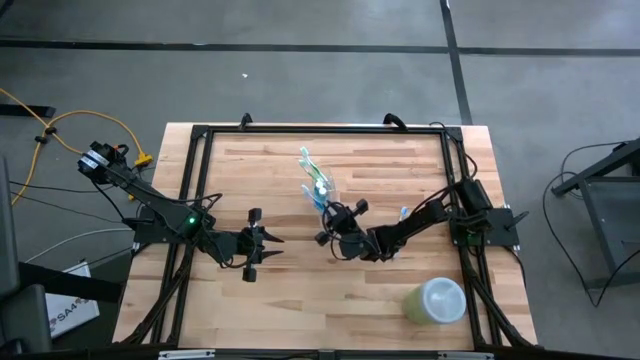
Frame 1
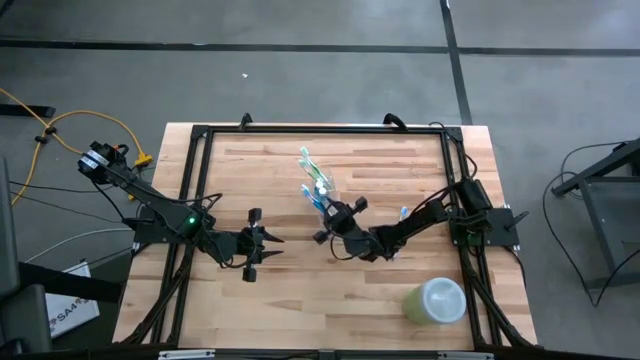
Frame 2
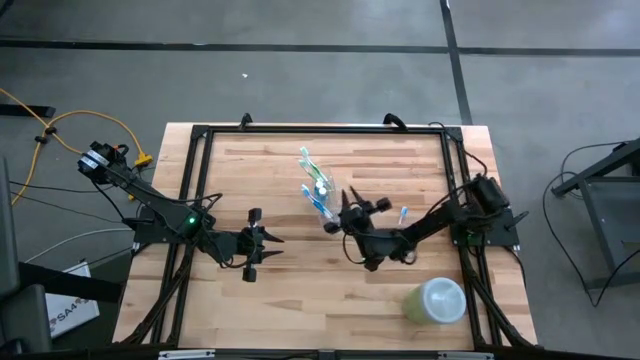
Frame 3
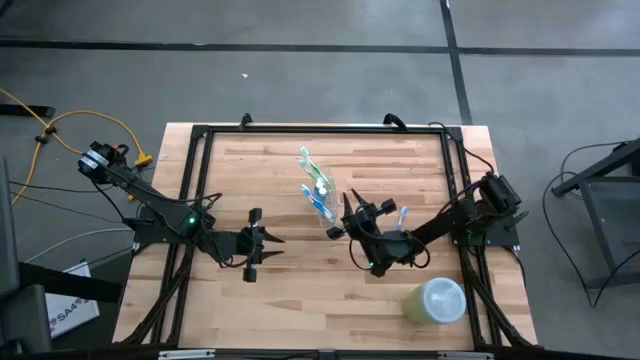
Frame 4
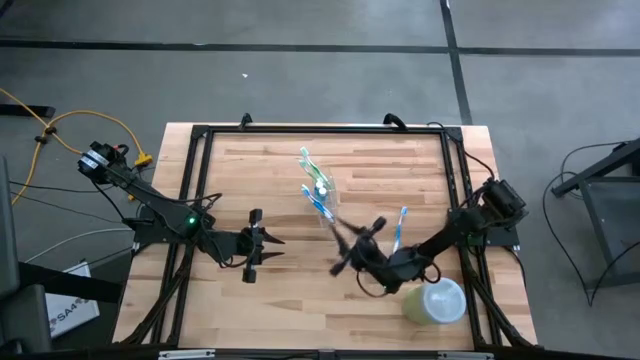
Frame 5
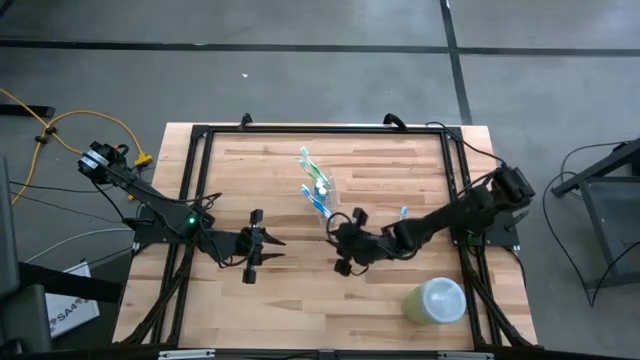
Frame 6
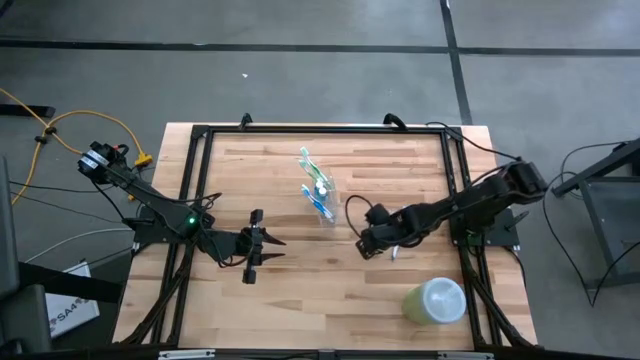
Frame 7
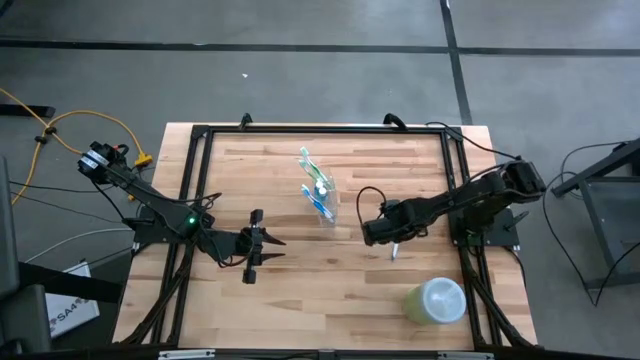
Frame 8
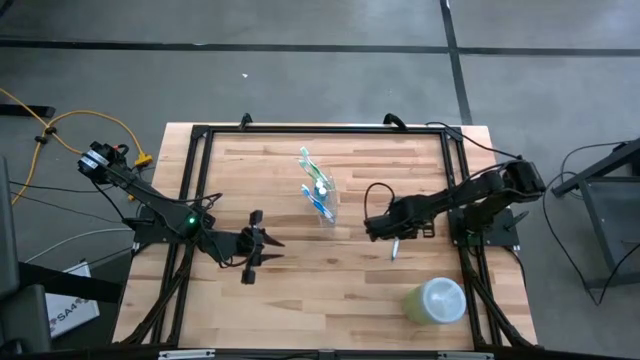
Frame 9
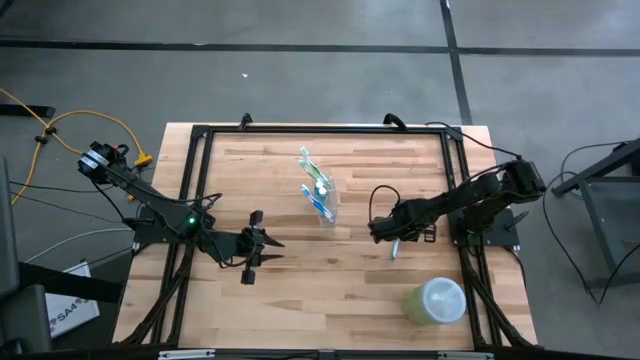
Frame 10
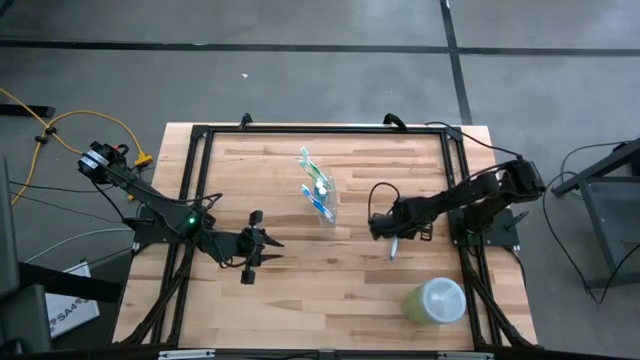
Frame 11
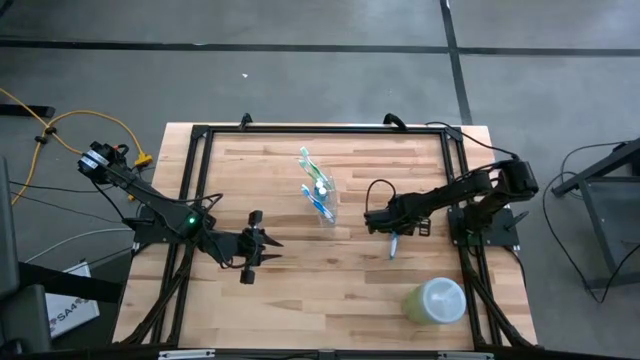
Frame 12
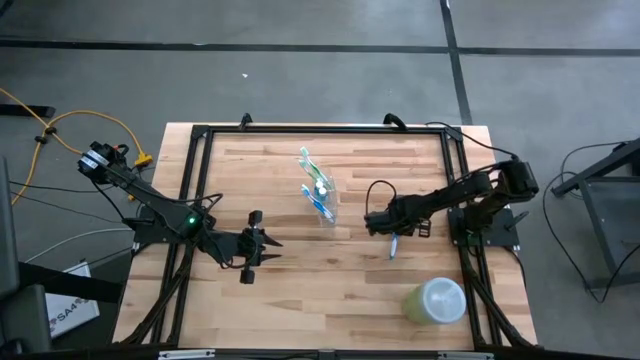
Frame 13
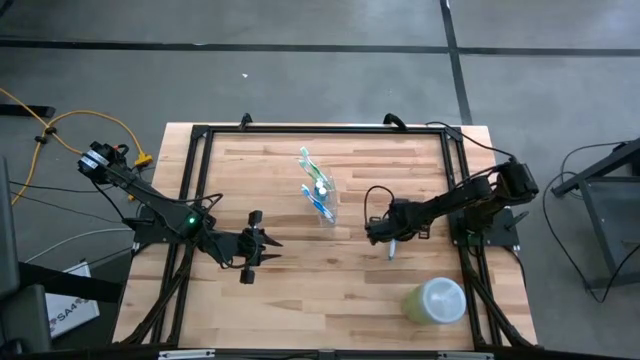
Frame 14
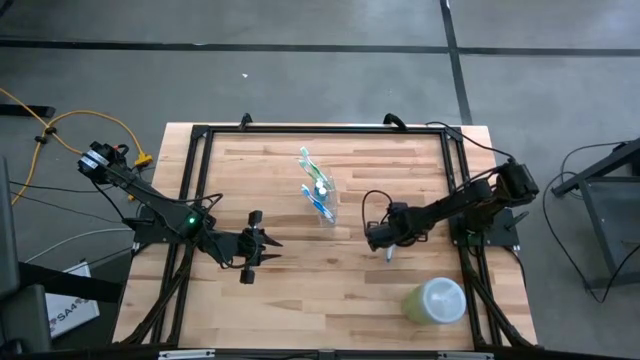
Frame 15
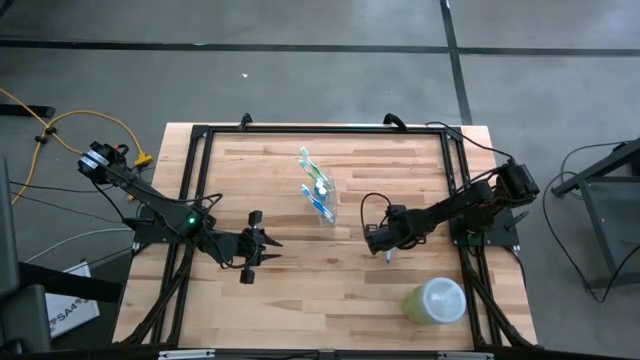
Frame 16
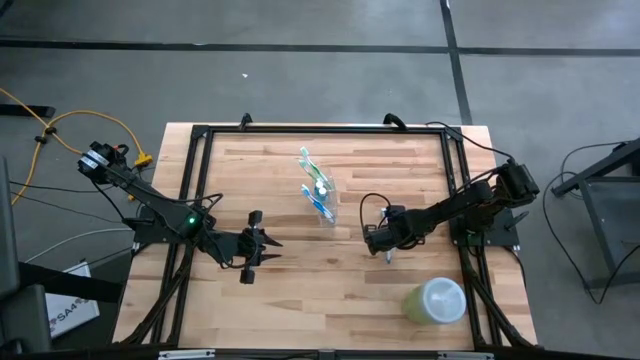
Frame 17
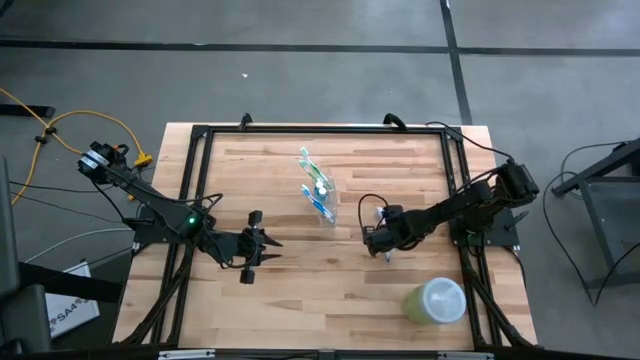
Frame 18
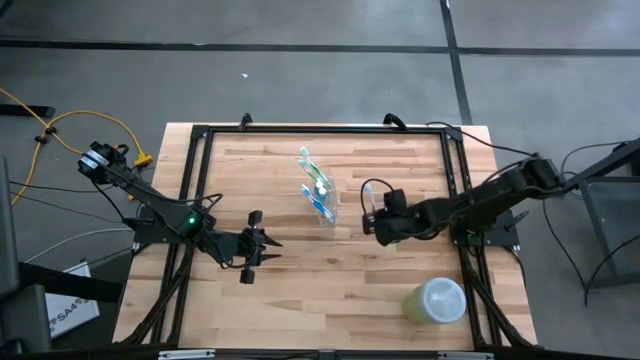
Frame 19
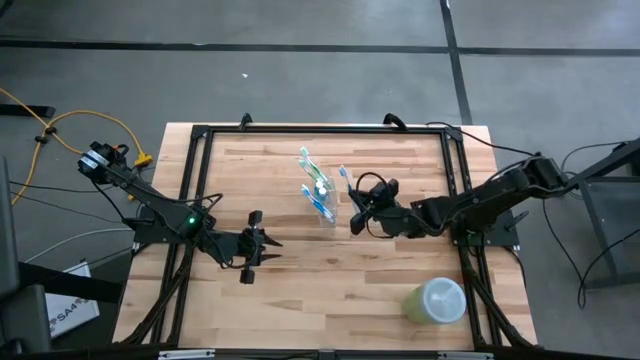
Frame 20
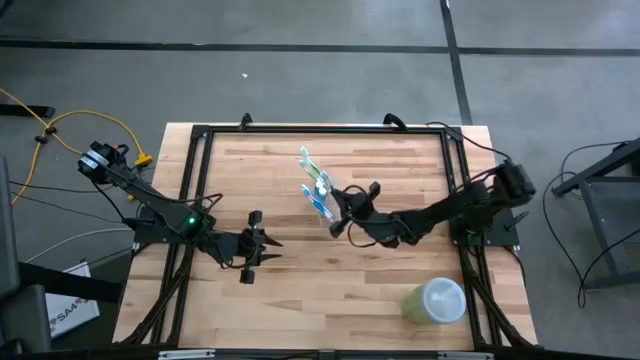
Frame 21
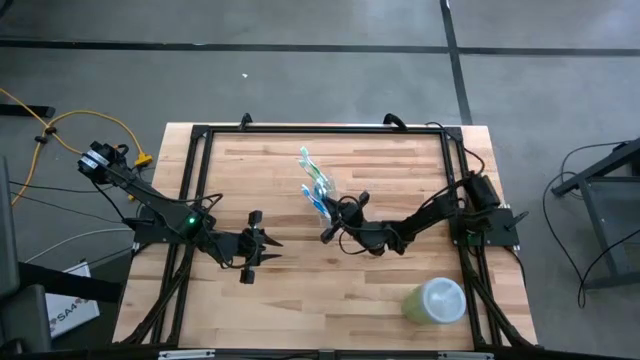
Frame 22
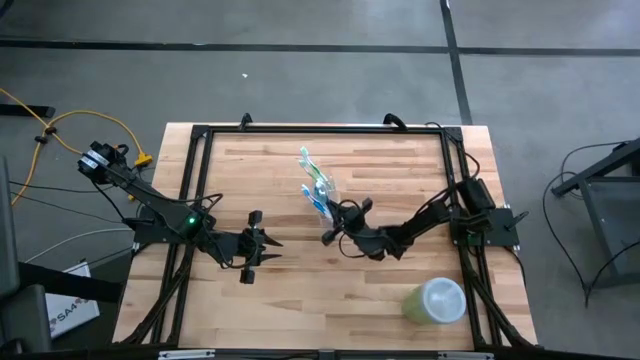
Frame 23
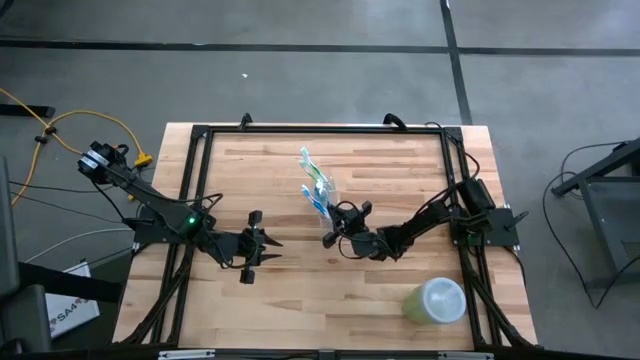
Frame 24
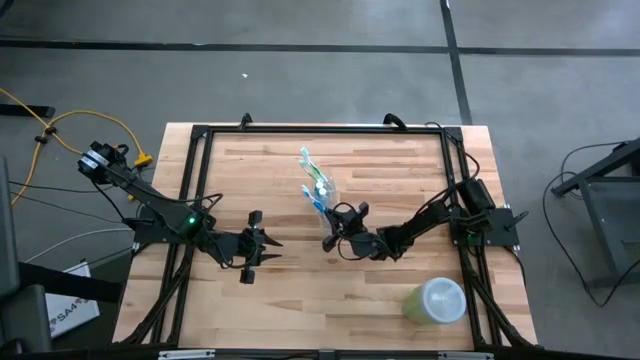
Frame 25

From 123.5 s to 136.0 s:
Task: Pick & Place toothbrushing station
Put the blue toothbrush into the transparent organizer

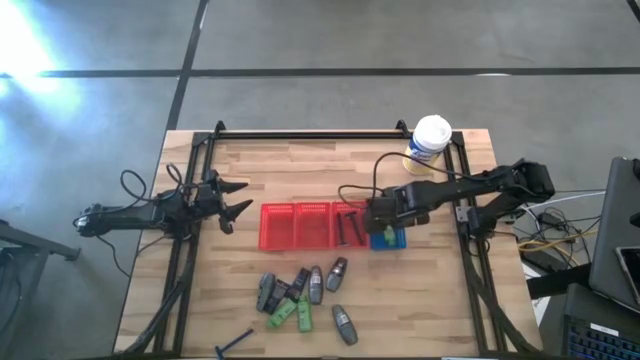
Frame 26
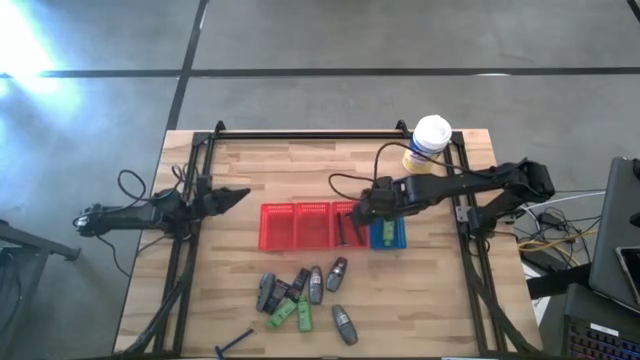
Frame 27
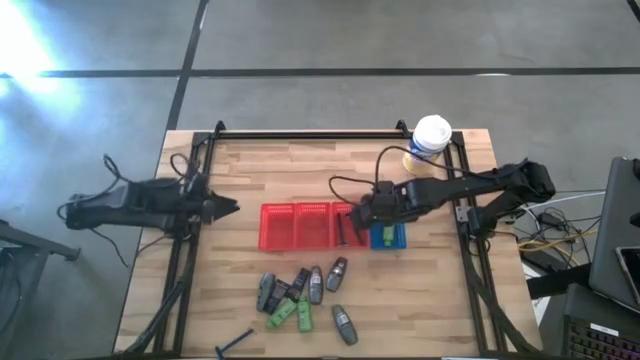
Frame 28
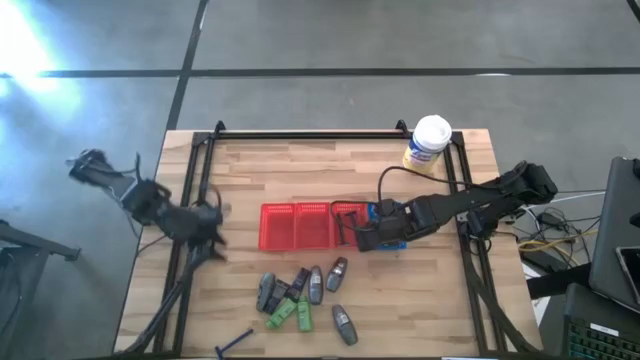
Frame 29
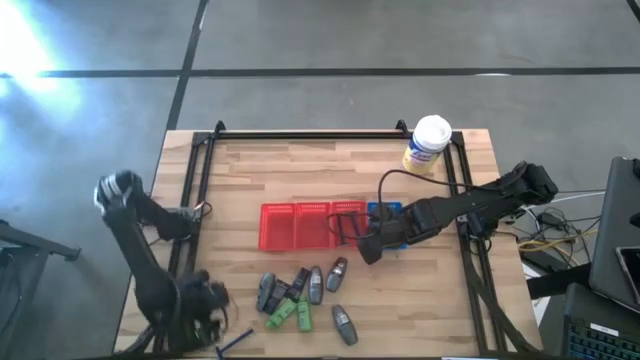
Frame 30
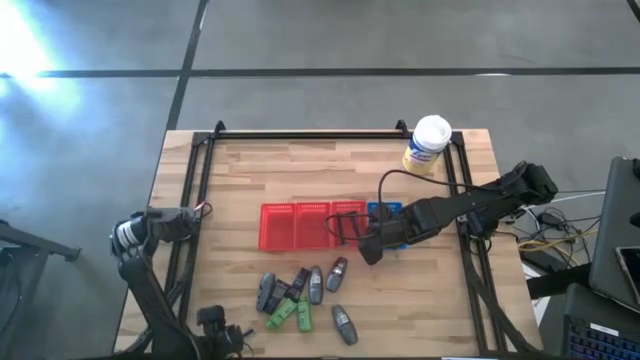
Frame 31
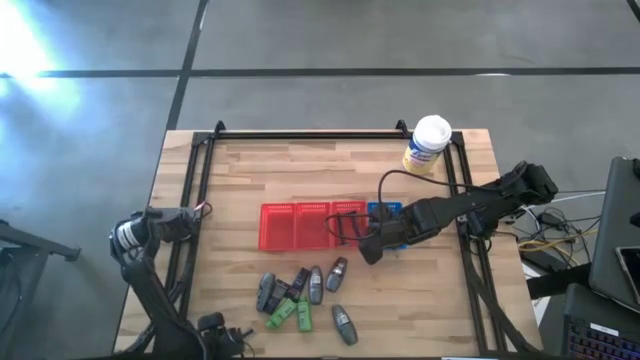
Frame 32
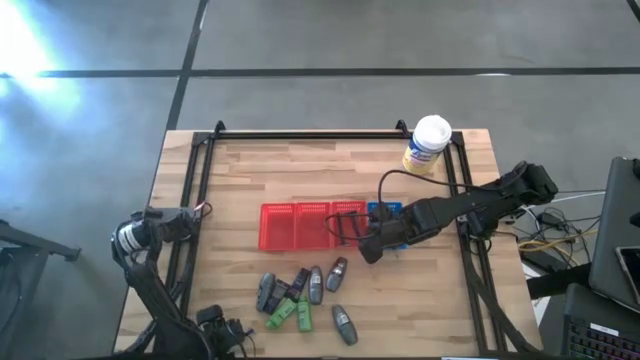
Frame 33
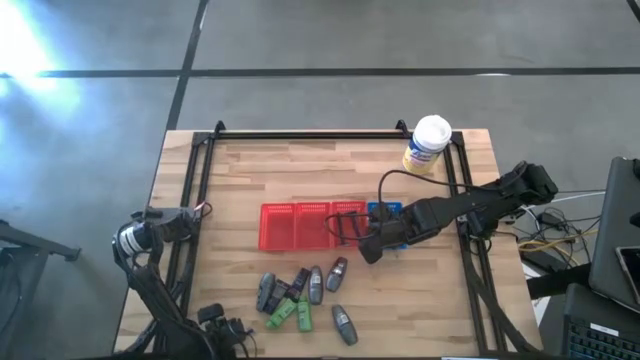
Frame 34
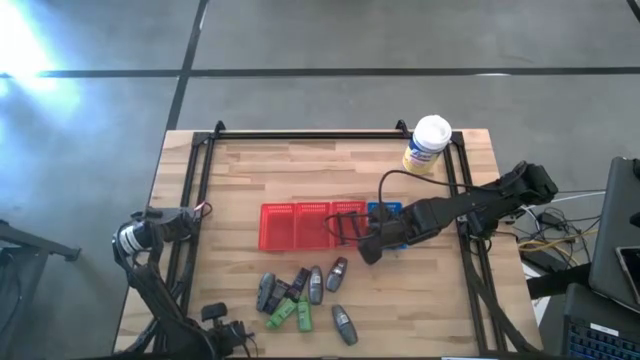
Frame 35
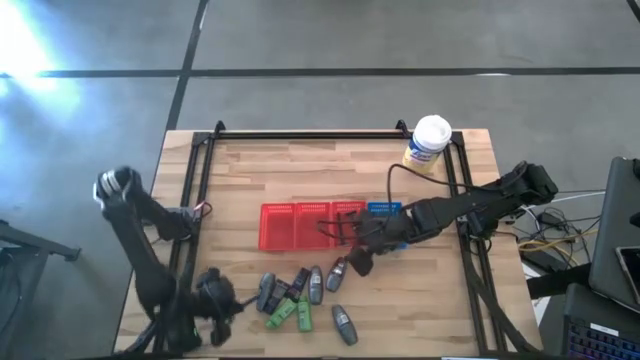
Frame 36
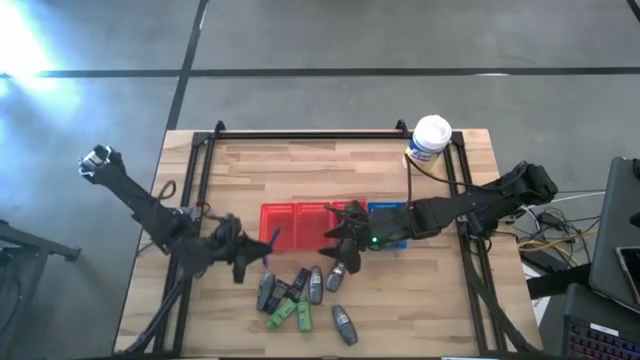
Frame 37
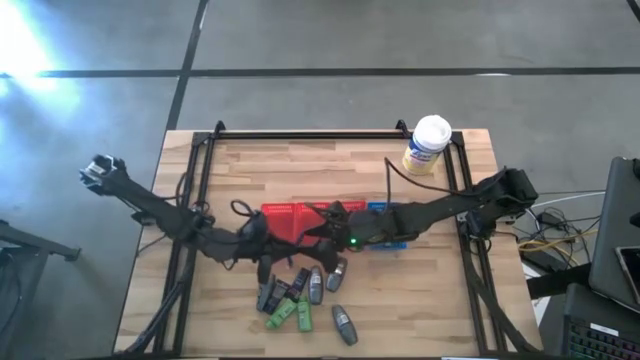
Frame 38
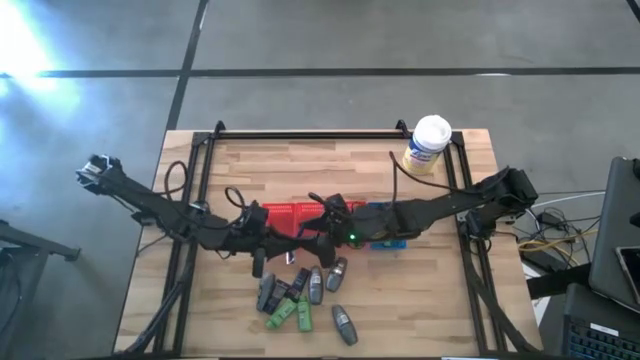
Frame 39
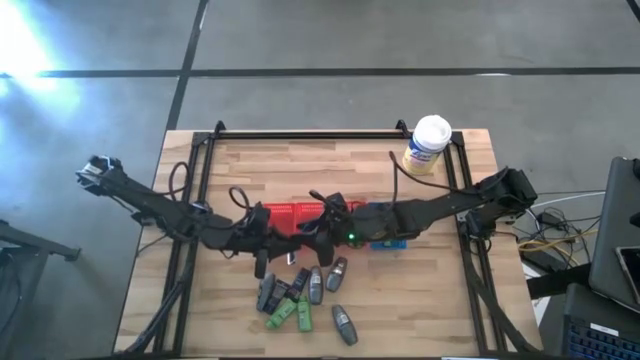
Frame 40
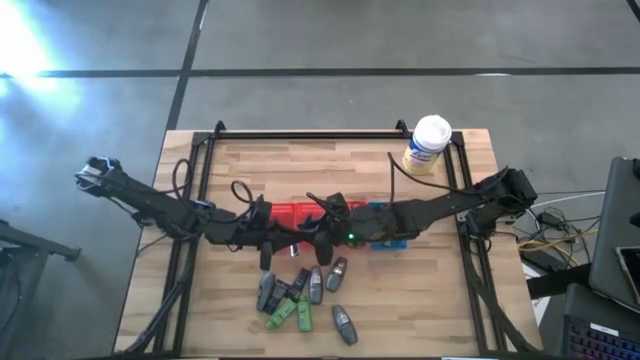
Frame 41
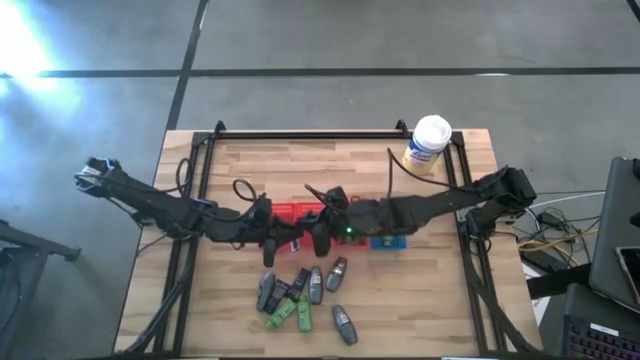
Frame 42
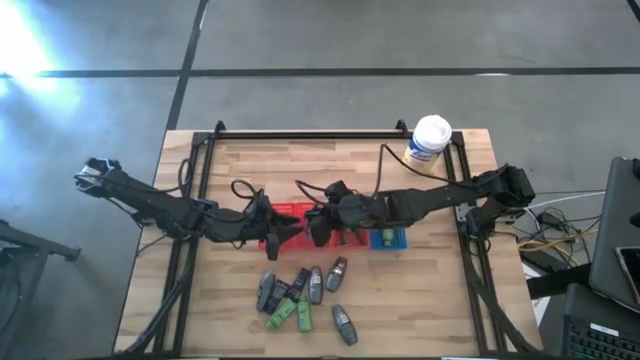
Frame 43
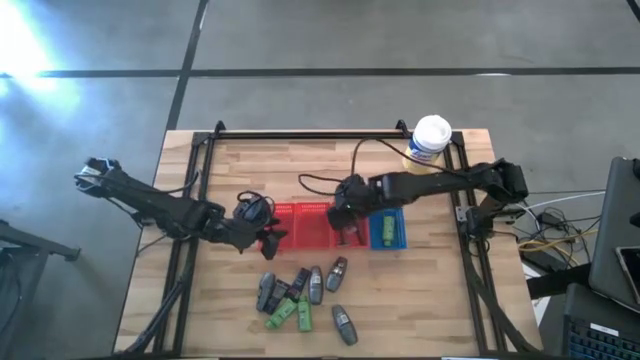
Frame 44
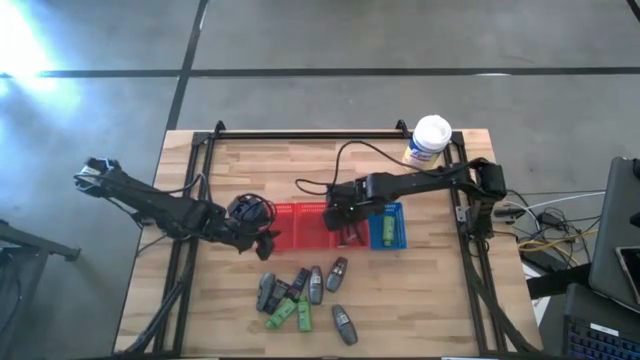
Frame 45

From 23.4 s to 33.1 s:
Task: Pick & Place Travel size toiletries
Put the blue razor into the right red bin
